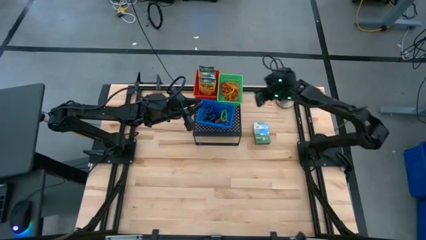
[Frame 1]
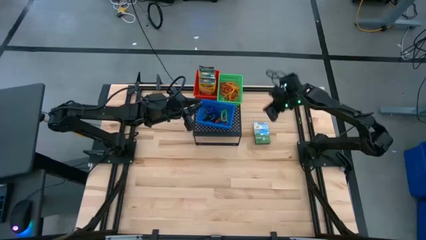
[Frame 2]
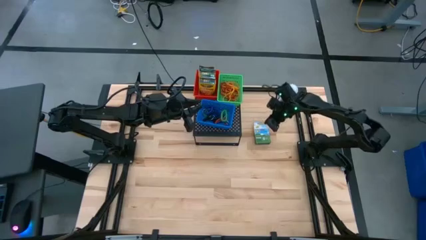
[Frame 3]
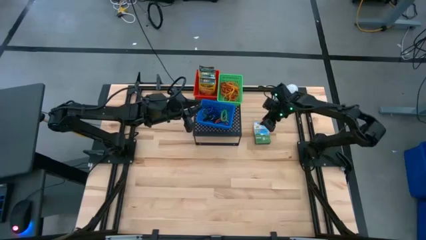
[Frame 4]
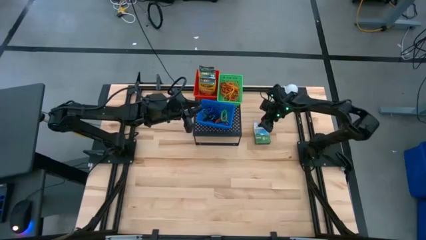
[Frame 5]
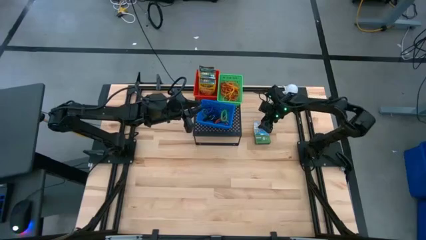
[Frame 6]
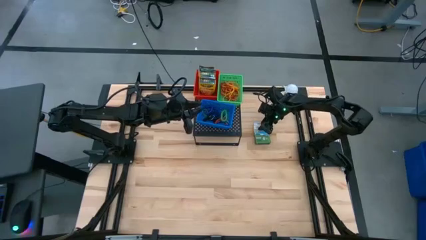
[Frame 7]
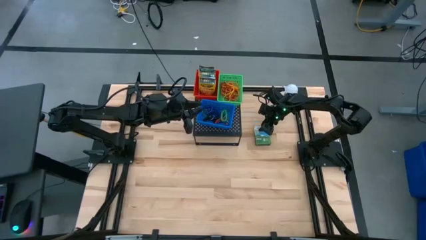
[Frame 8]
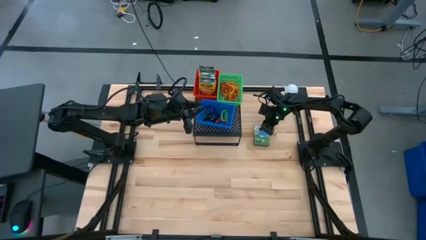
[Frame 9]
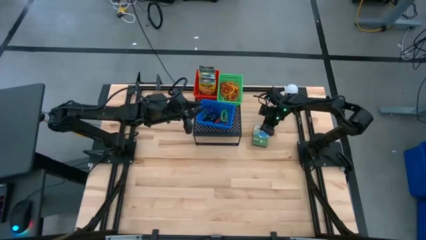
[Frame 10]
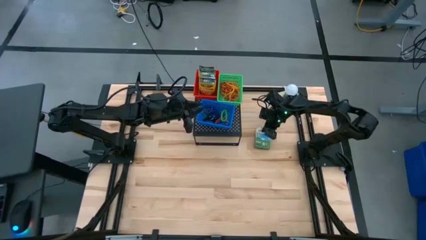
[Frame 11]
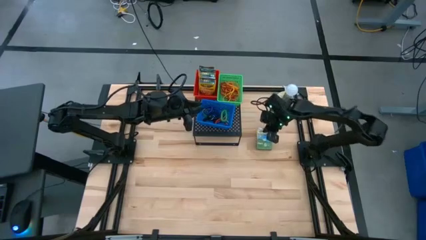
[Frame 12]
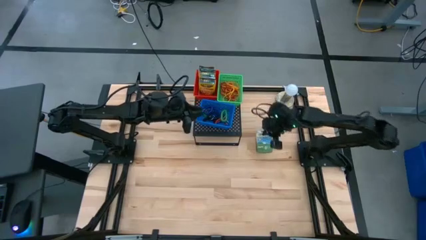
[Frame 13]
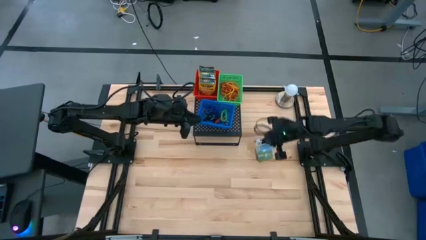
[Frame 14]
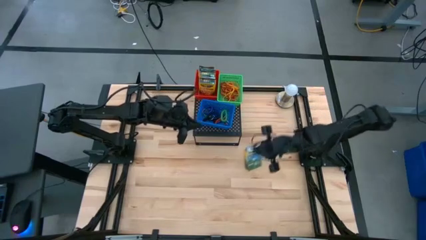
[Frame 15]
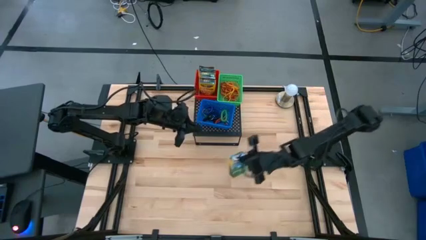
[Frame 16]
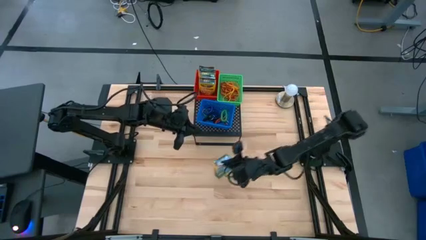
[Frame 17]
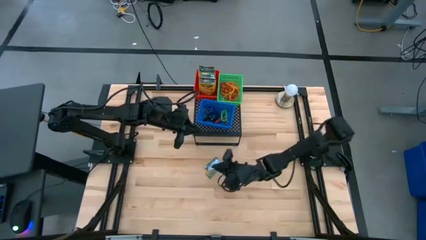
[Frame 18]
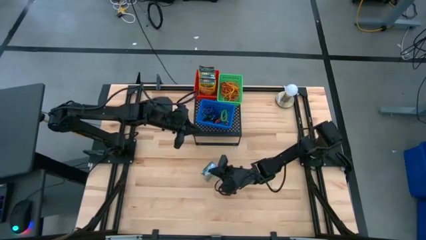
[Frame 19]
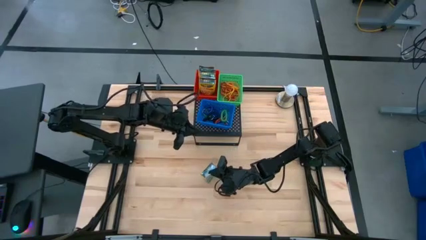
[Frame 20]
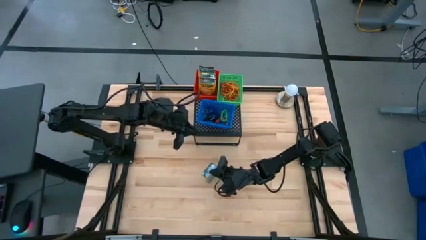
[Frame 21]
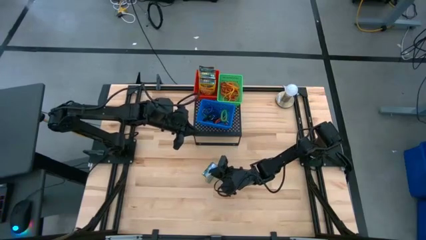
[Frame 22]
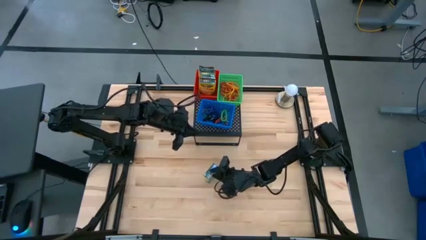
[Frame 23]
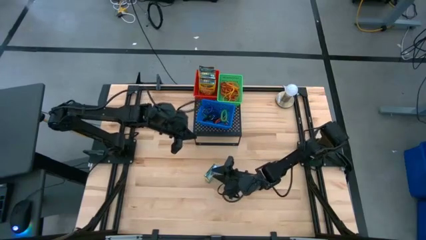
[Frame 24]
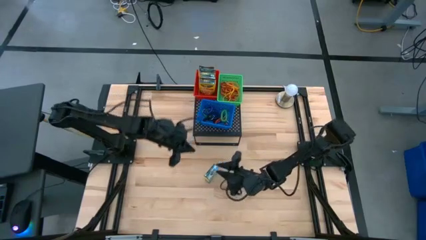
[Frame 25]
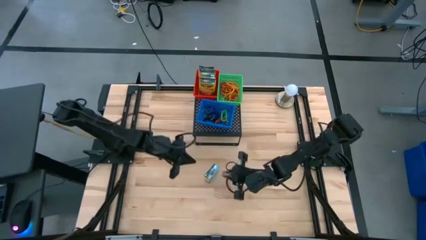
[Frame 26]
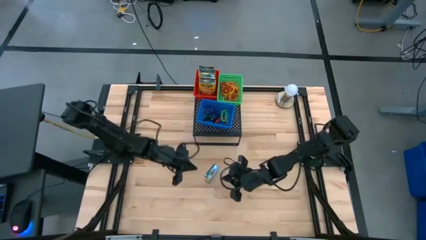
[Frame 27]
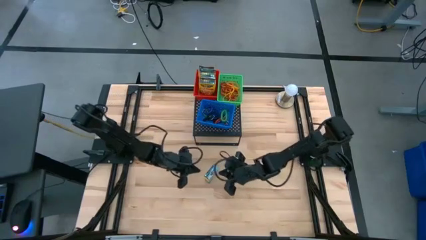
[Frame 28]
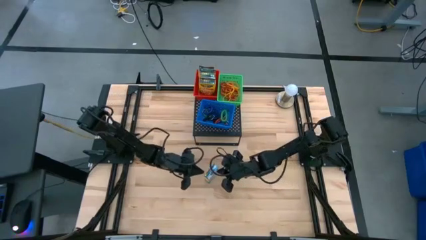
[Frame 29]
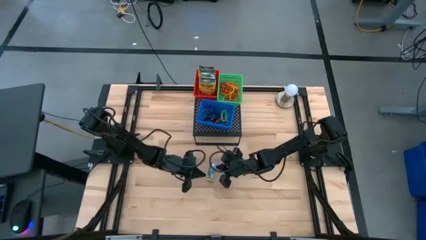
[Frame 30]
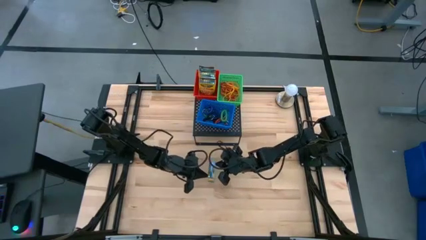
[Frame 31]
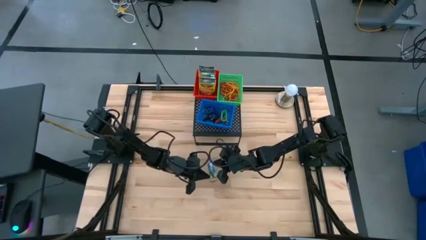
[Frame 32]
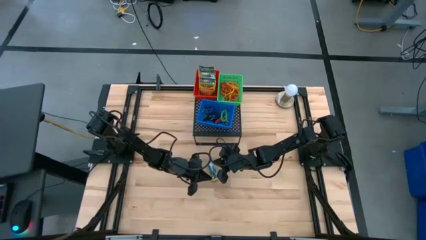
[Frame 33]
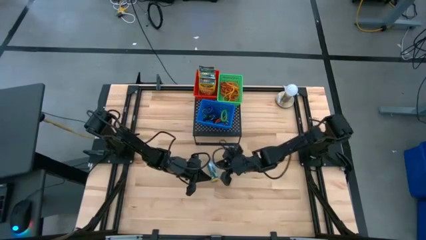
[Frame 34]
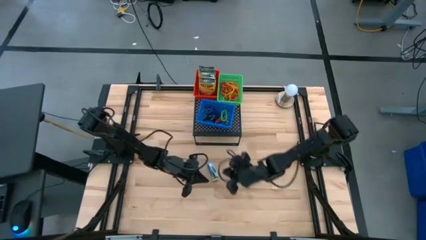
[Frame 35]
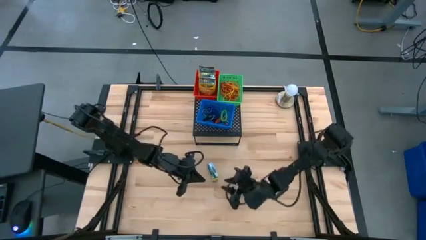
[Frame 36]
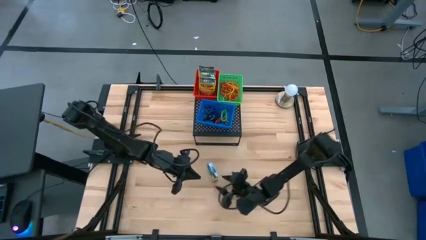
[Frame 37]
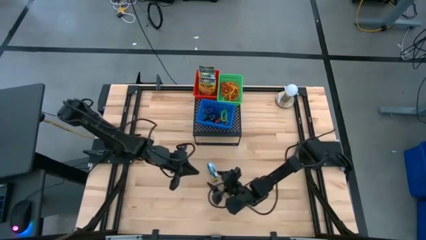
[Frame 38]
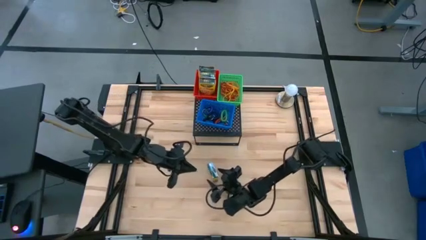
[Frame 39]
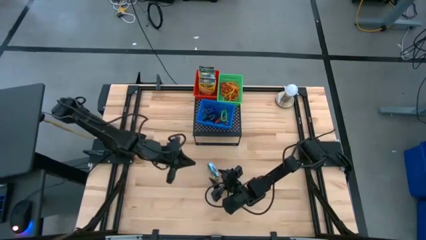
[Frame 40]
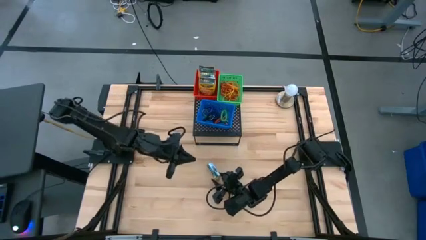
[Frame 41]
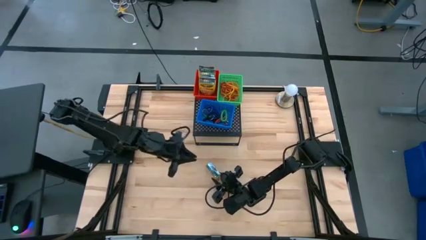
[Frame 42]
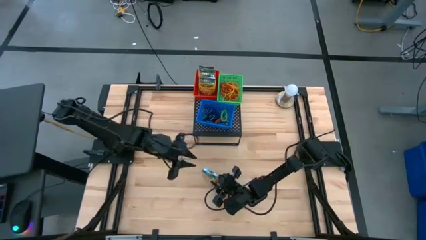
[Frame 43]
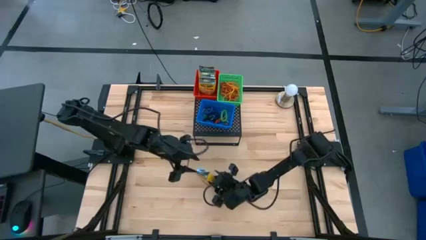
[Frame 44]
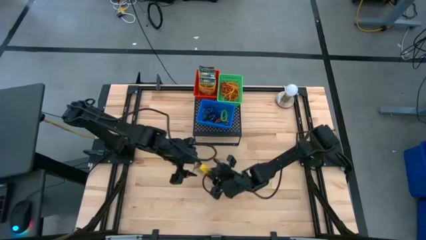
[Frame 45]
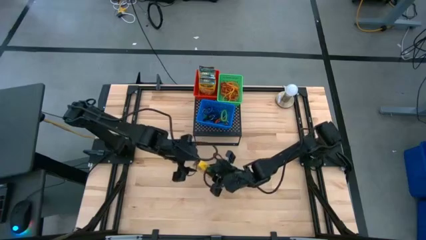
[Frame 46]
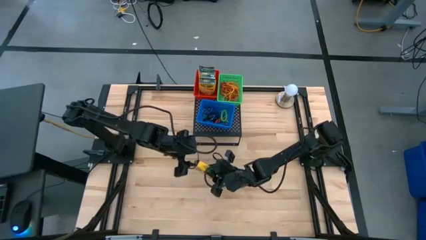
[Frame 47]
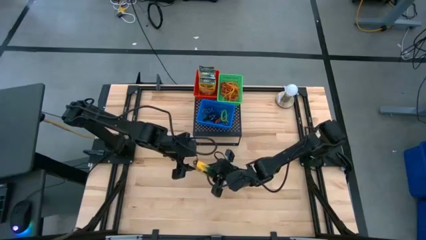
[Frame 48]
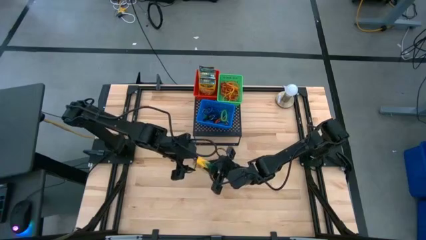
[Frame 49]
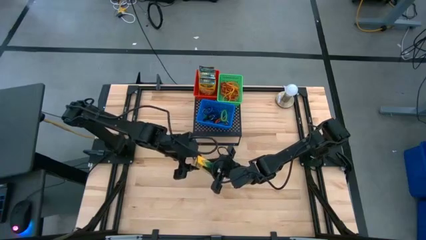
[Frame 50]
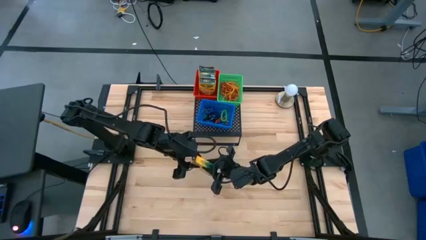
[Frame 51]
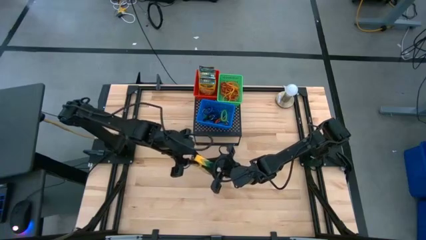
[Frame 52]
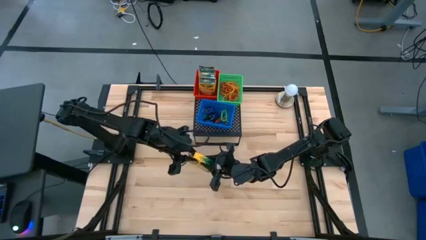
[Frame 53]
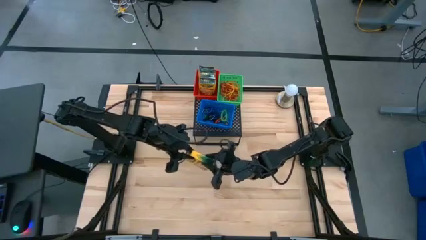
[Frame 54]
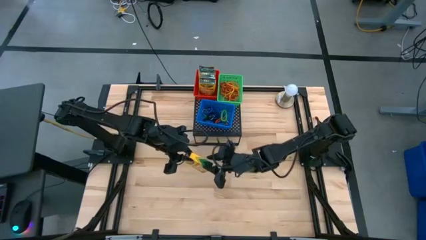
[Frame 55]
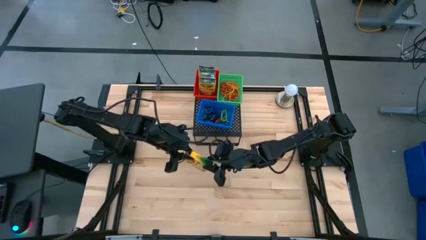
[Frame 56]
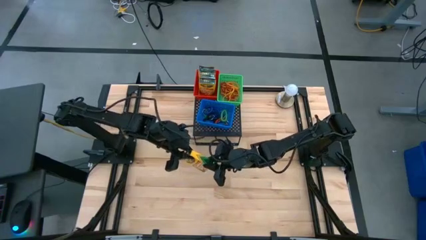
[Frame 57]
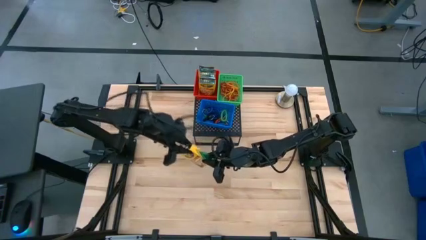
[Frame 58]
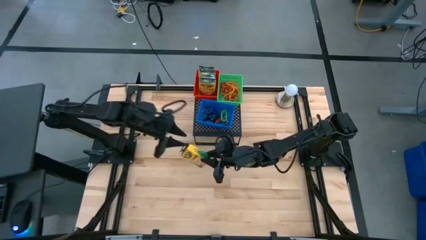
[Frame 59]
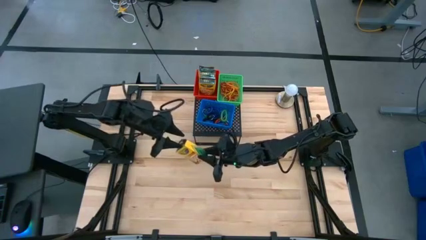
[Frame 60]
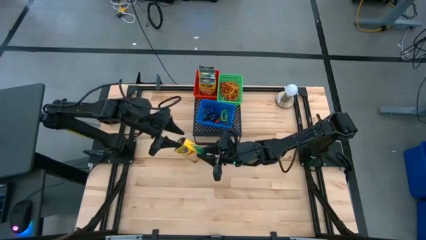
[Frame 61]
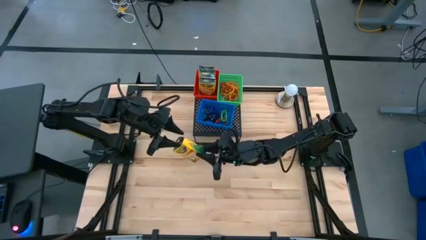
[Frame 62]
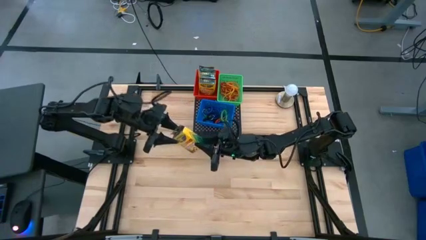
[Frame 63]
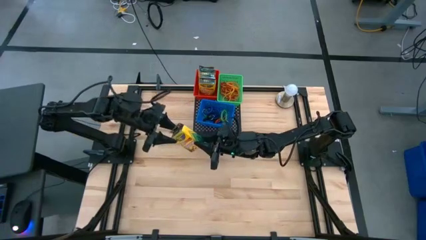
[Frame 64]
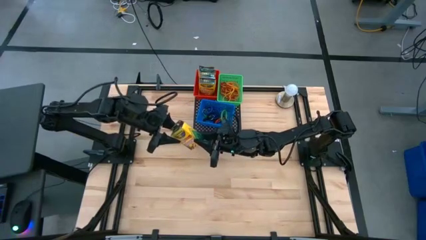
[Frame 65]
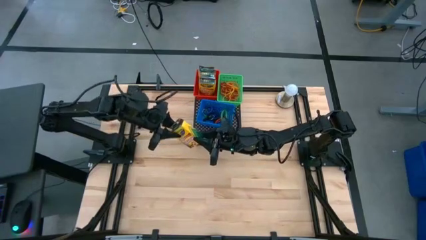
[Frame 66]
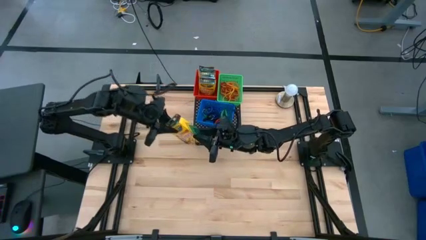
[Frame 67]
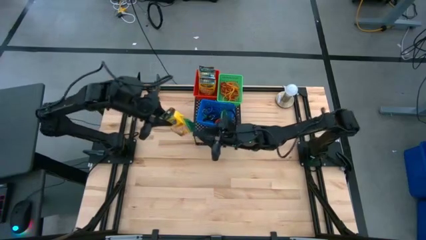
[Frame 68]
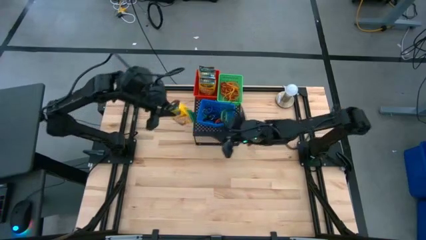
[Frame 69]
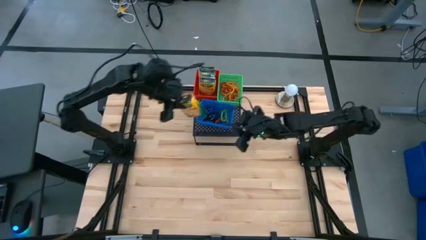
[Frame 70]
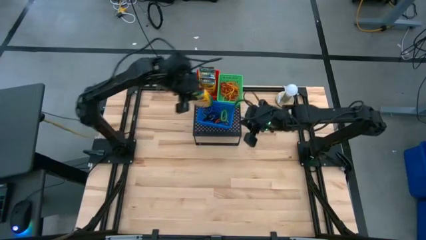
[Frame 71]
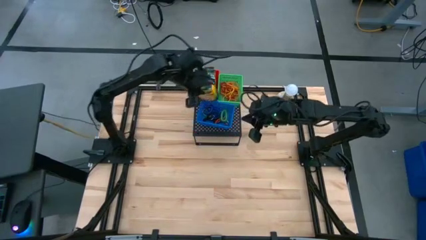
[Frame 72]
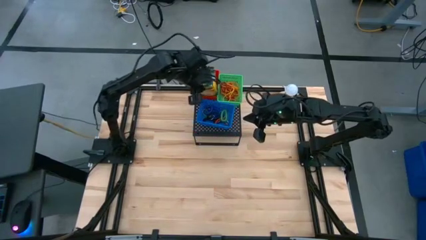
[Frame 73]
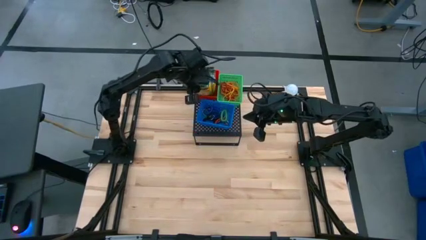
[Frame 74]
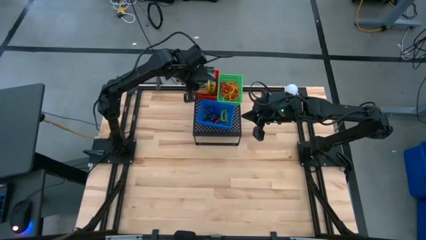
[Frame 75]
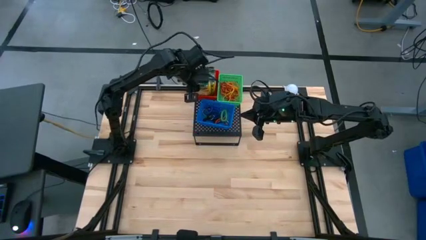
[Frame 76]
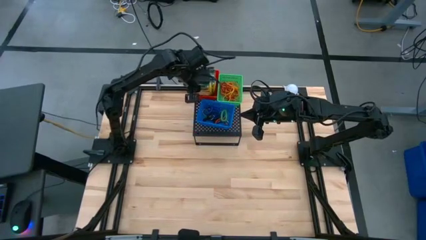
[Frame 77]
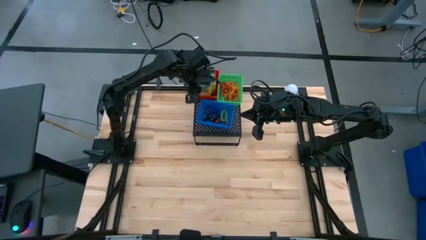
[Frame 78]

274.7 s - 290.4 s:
Task: Pick & Place Office Desk Supplies
Put the yellow crayon box into the red bin on the shelf
